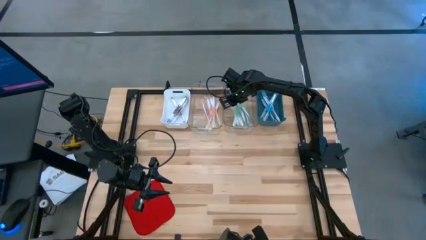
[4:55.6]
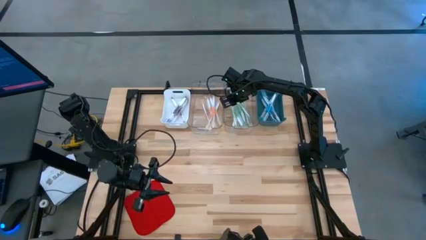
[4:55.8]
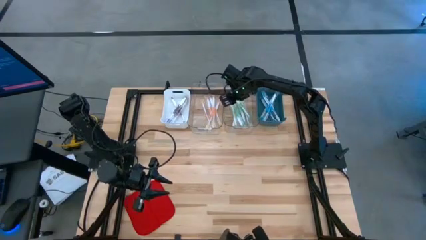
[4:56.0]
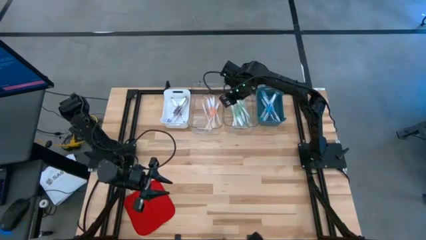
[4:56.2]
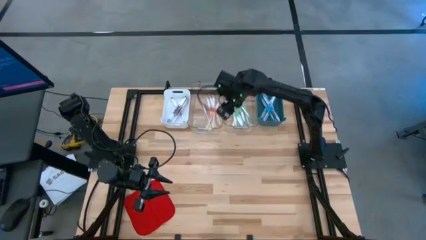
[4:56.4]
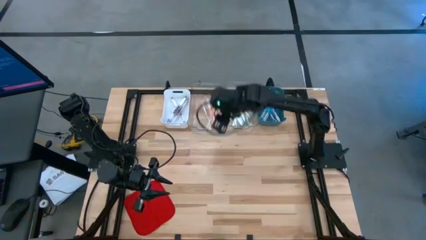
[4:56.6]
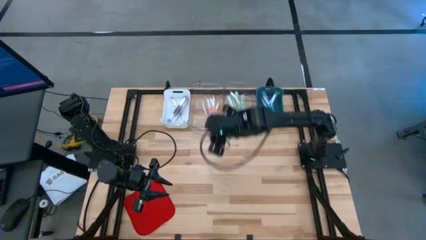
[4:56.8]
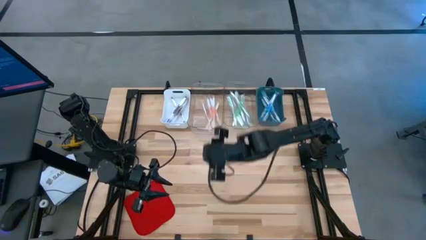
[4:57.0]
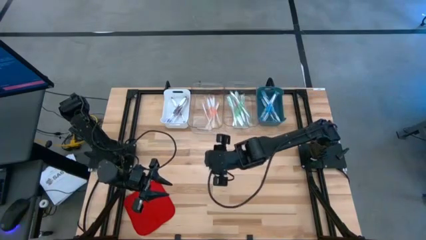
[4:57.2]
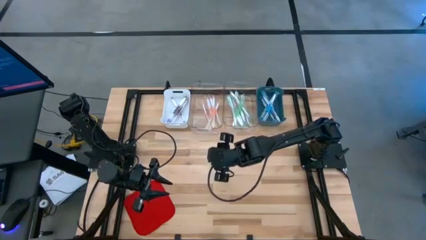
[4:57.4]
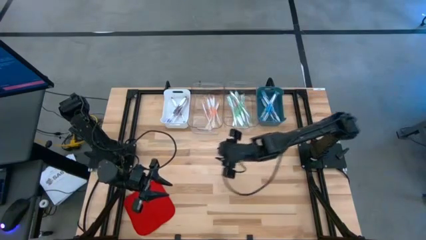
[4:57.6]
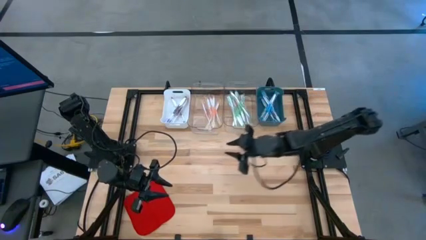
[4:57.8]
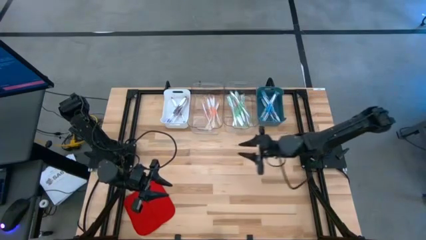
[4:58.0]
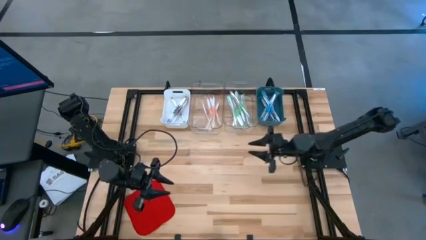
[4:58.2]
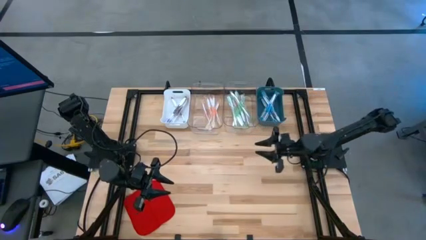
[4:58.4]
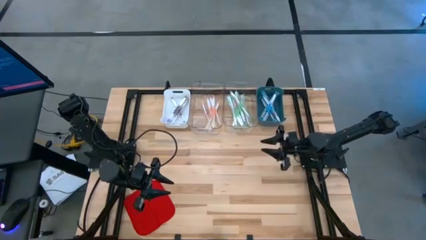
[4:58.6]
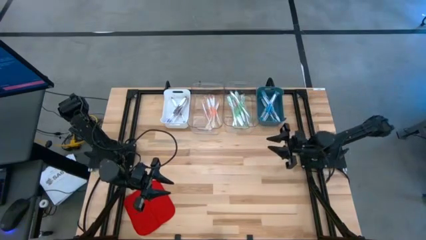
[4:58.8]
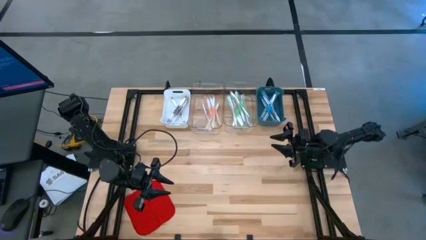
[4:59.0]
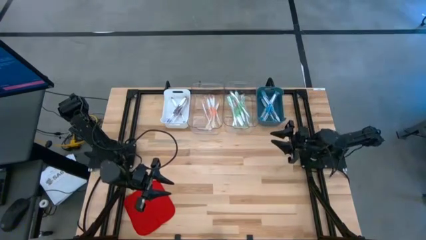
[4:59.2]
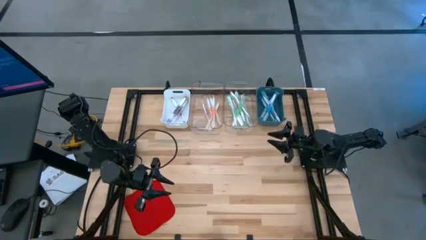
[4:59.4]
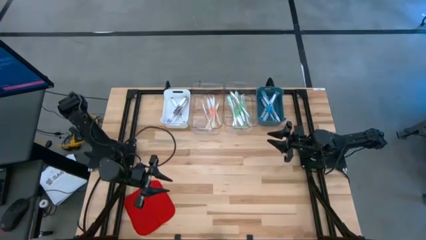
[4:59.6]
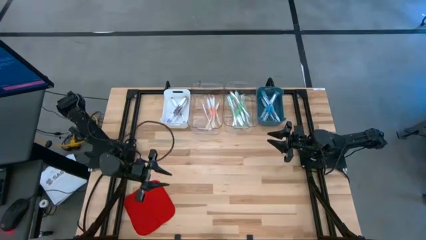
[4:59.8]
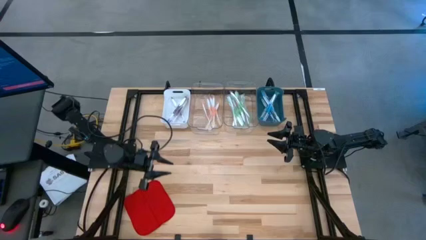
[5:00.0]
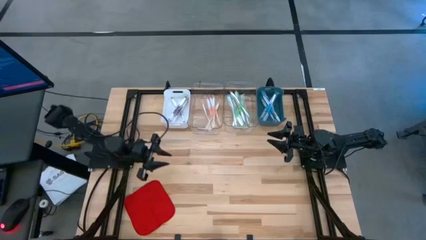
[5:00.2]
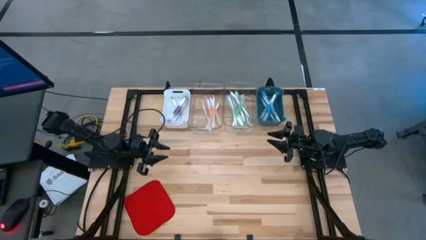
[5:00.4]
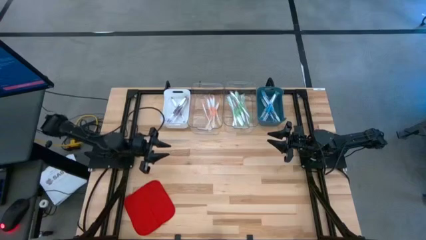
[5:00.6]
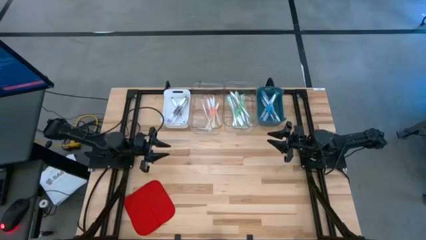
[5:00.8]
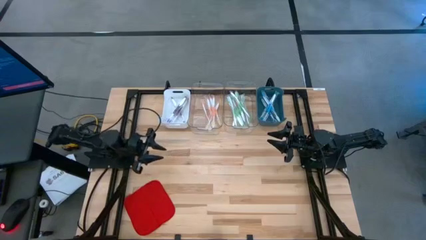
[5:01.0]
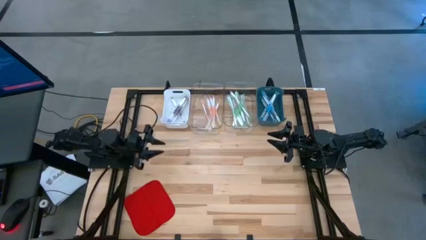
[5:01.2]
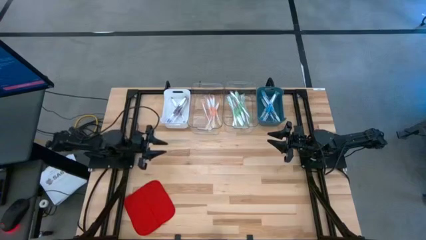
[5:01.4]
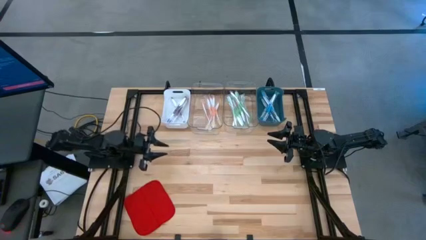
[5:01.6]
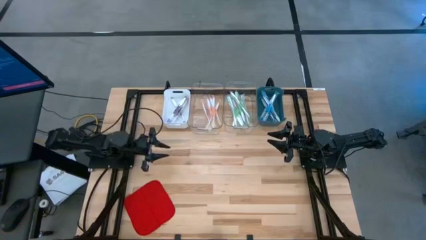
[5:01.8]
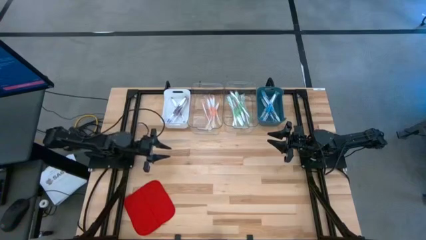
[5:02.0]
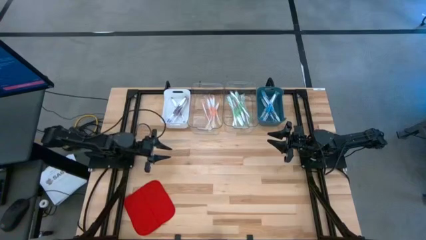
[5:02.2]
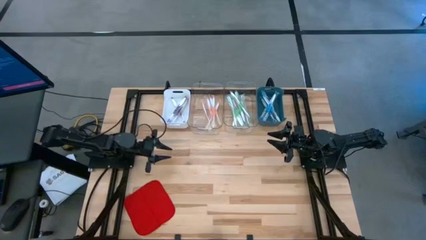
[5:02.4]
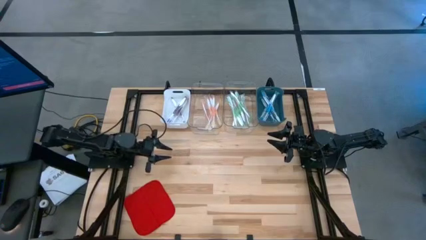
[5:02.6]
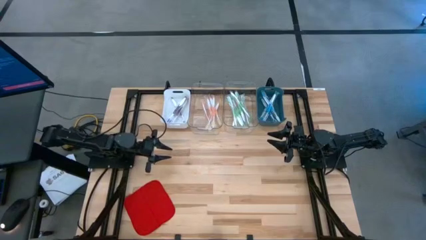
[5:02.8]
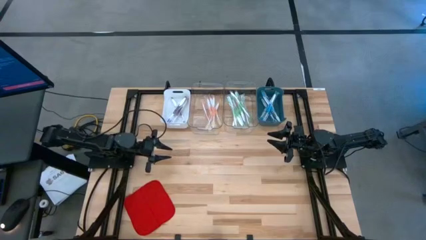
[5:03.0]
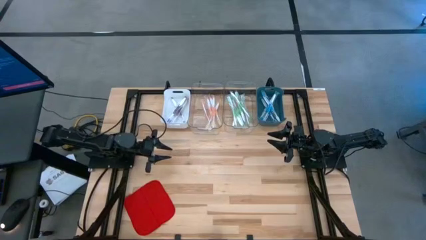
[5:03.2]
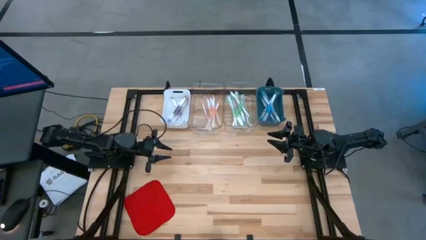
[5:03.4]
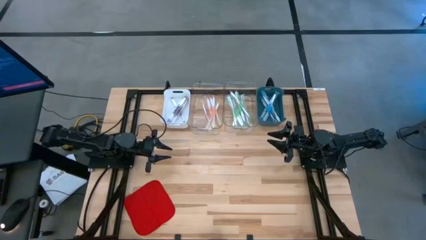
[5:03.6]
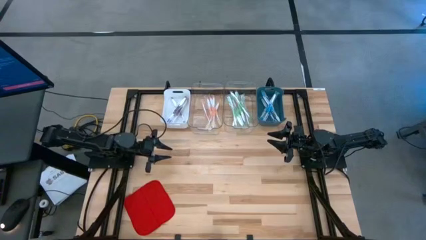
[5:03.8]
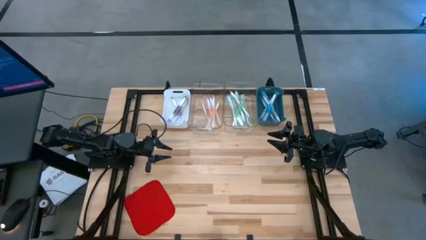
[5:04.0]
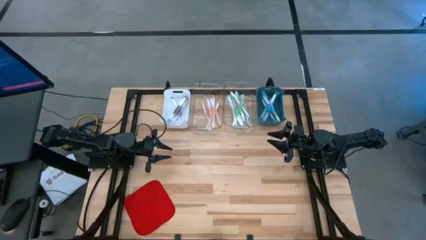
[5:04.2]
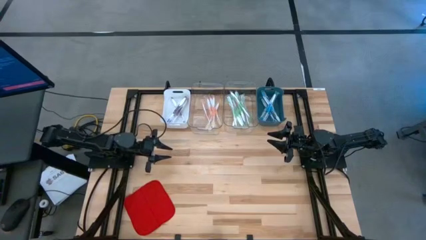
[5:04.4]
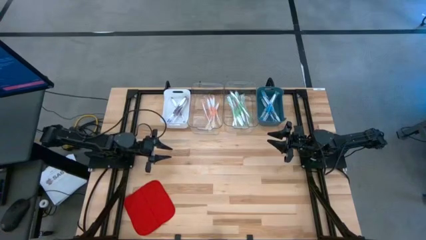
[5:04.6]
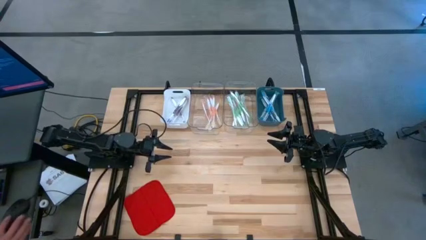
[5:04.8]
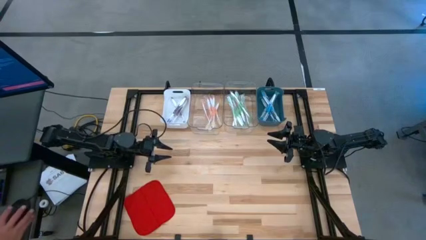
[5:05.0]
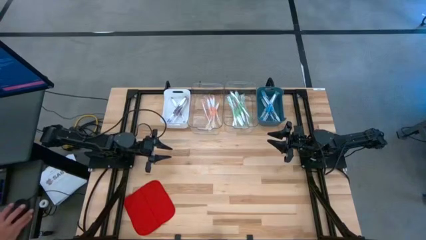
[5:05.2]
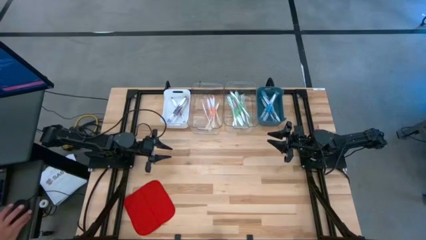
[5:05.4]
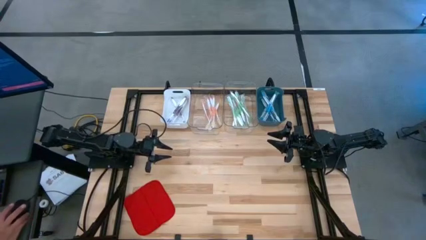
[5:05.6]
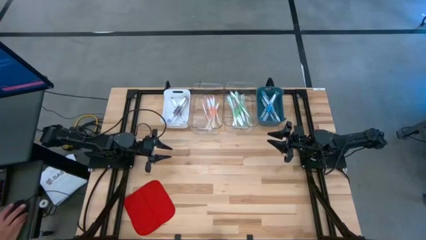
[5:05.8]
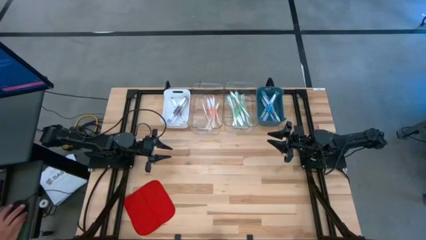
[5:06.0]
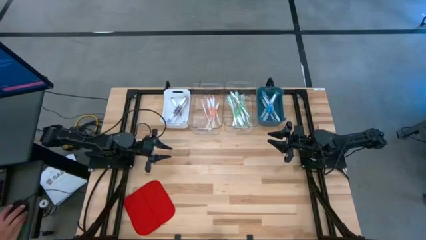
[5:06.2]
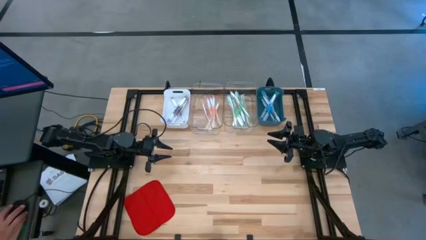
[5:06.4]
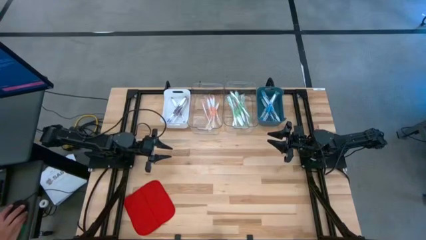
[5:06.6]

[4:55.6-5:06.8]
Task: Pick & Place Toothbrushes
Return to Home Position
